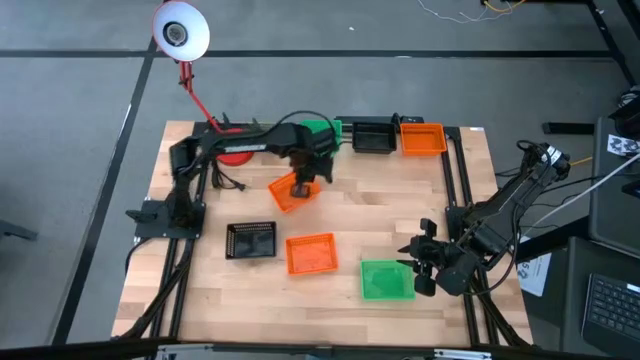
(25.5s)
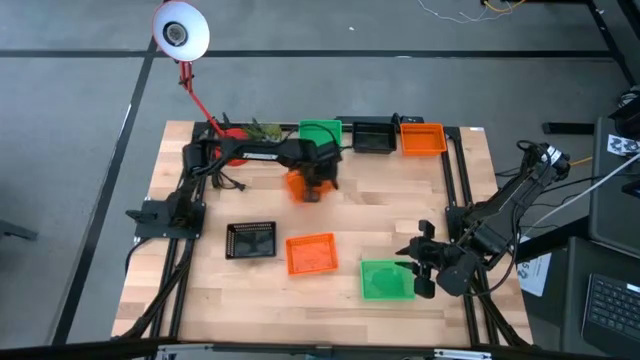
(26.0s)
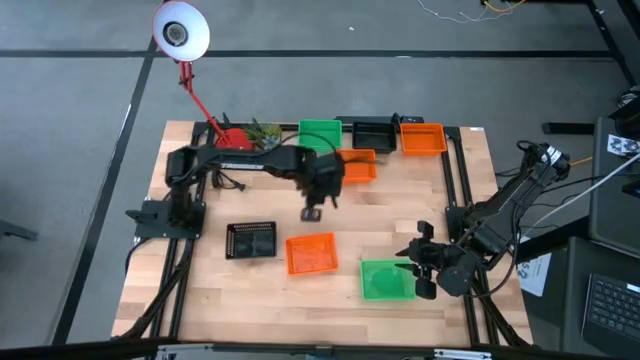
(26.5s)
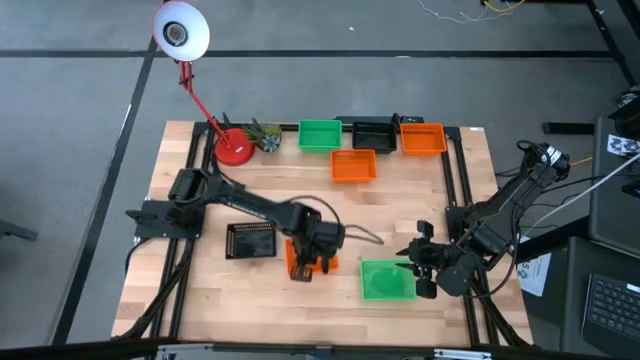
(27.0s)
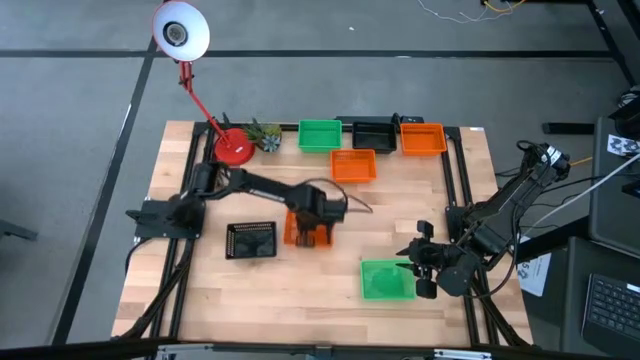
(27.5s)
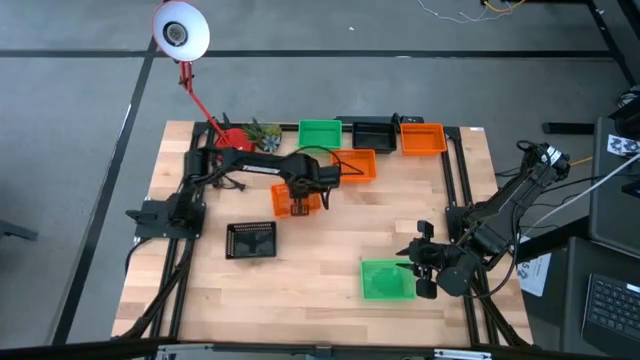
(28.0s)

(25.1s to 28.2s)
Move the orange bins to the top of the table

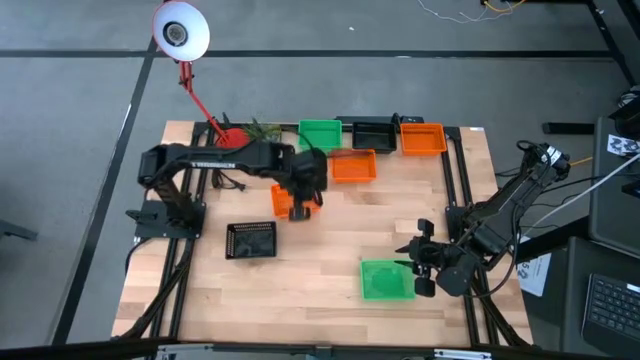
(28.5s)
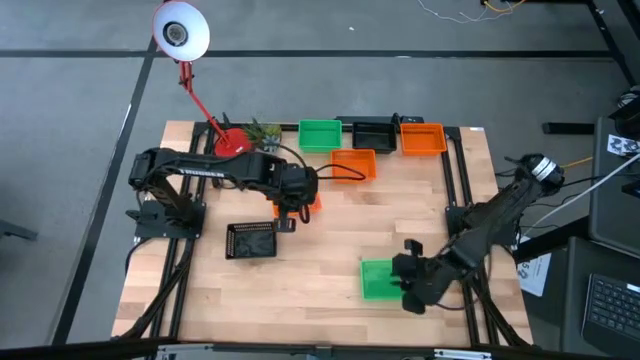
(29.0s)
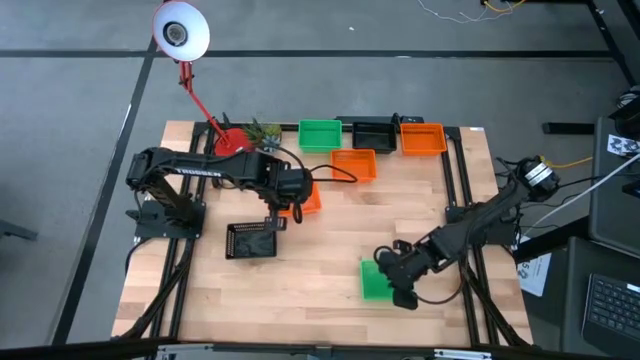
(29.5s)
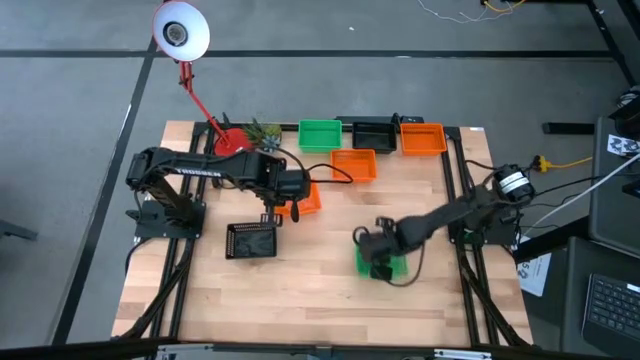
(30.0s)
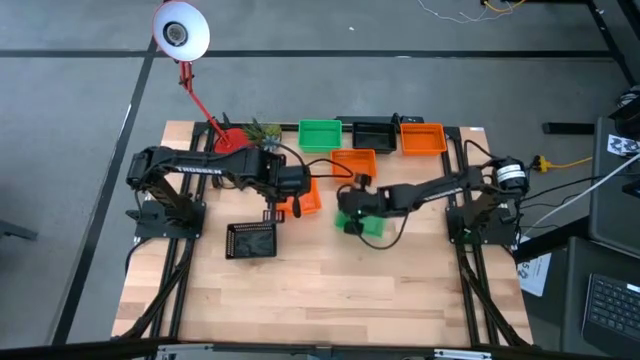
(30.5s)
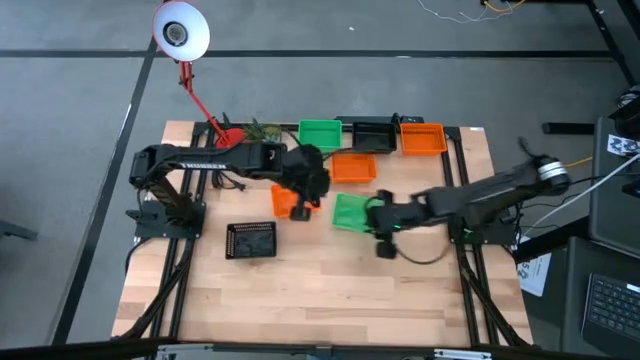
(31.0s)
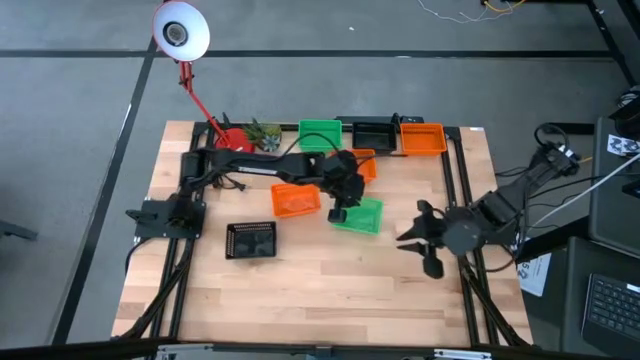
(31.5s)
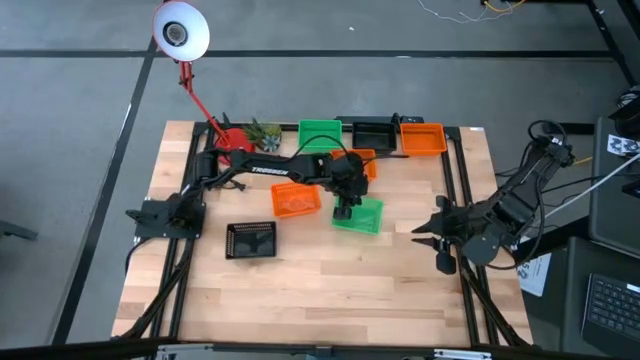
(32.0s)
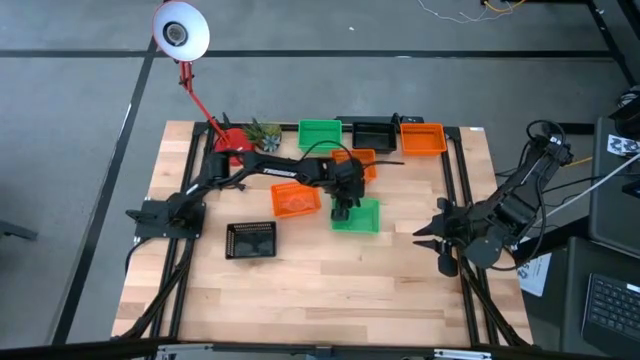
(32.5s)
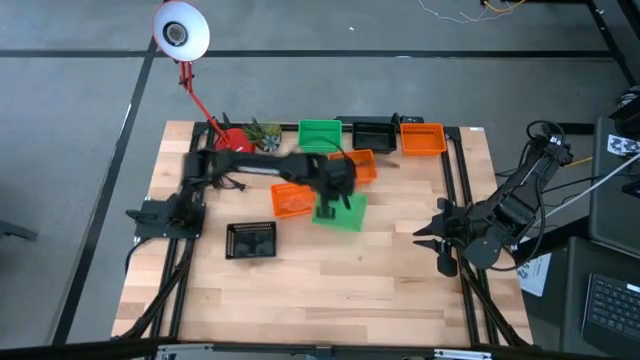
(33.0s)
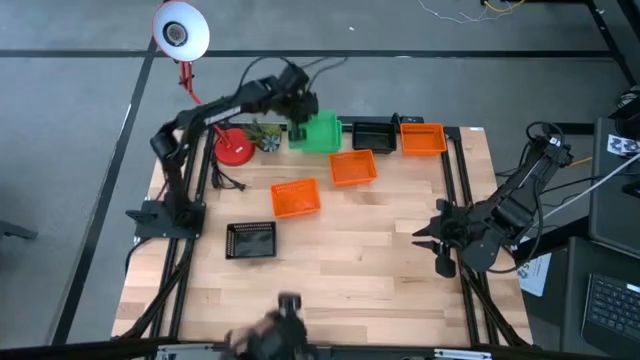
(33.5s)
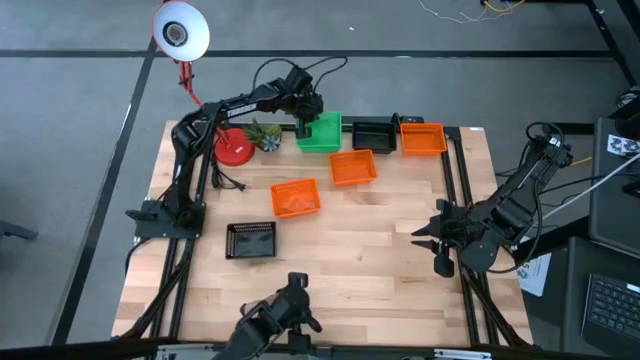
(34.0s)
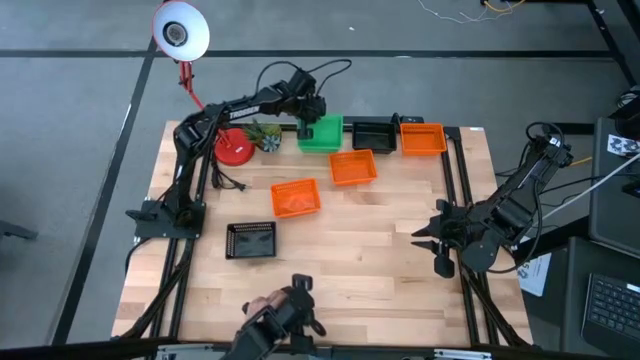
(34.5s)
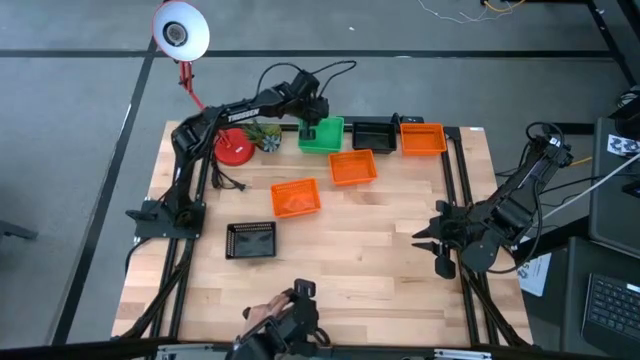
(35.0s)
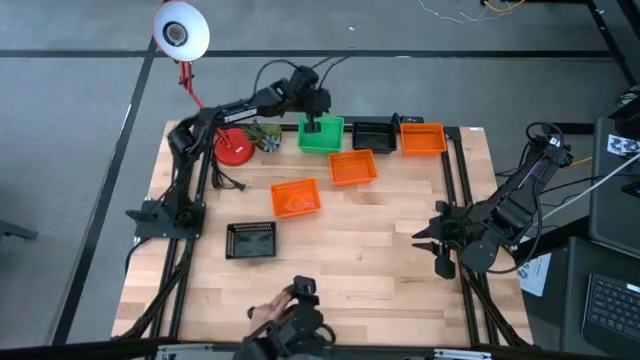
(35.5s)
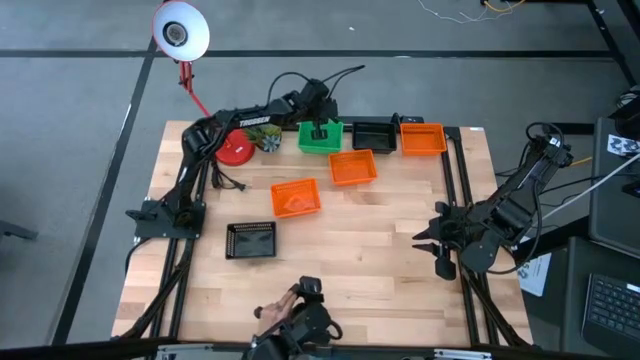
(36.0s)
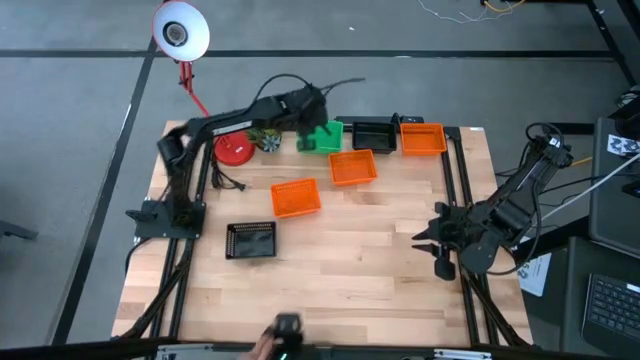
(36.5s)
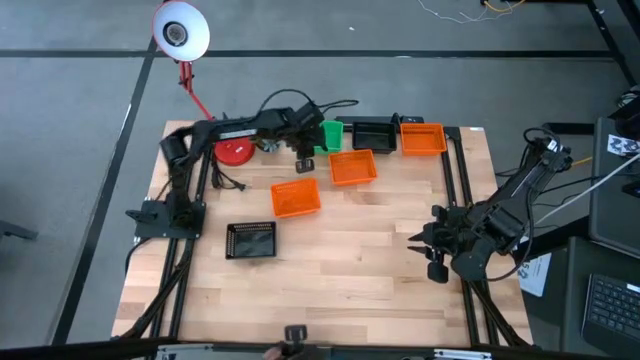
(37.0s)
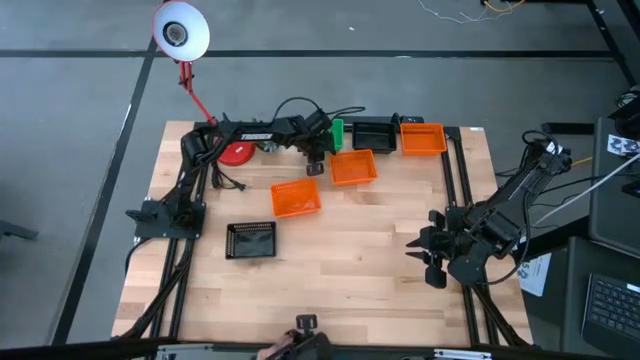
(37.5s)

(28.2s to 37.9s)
Stack the bottom green bin on top of the top green bin

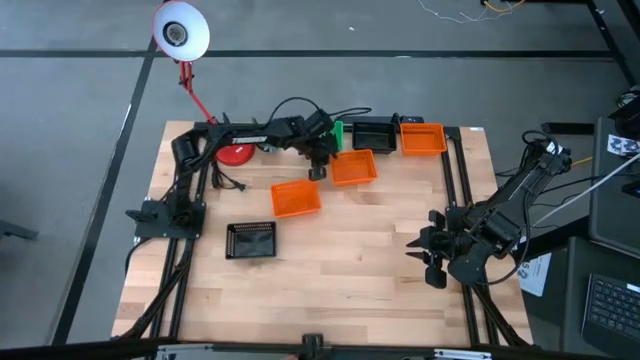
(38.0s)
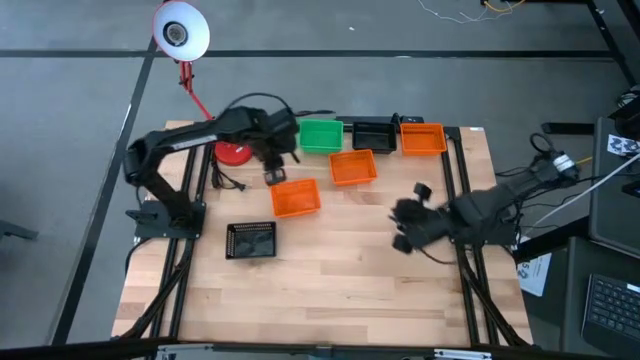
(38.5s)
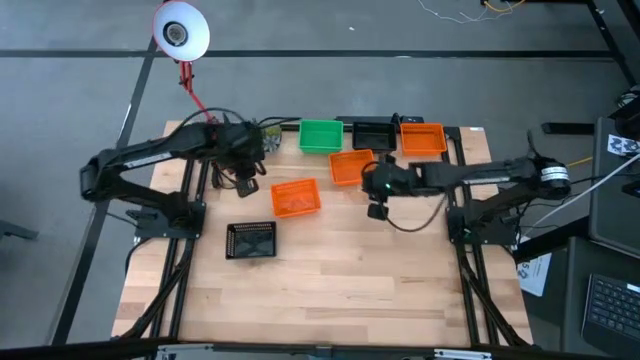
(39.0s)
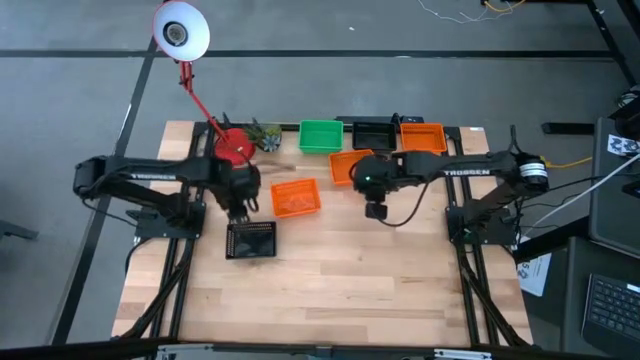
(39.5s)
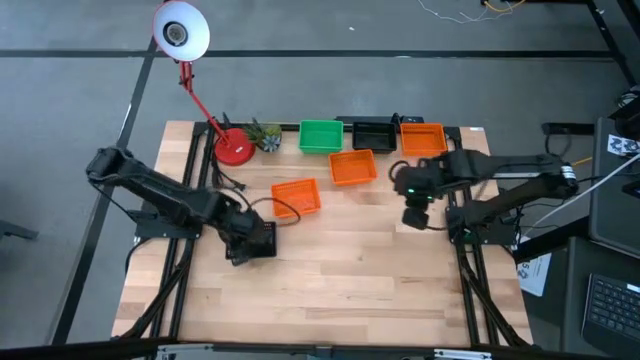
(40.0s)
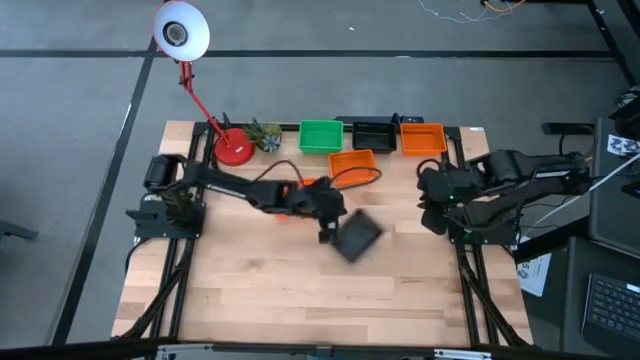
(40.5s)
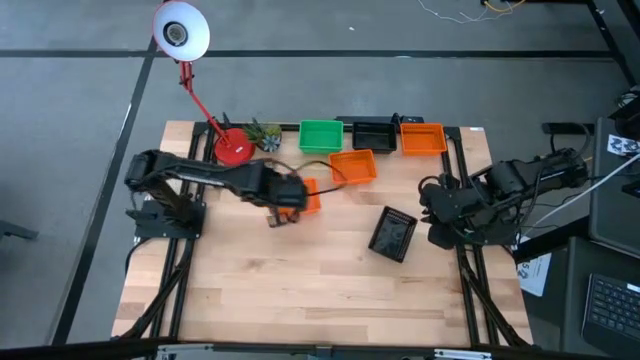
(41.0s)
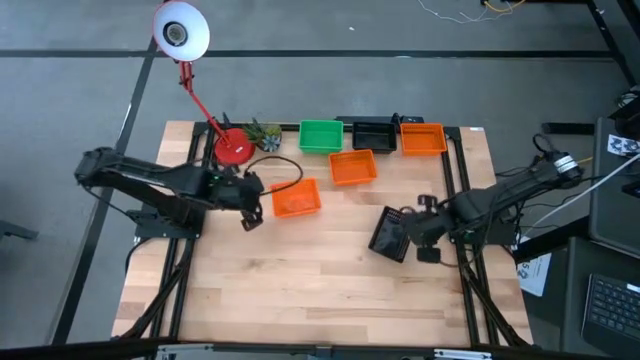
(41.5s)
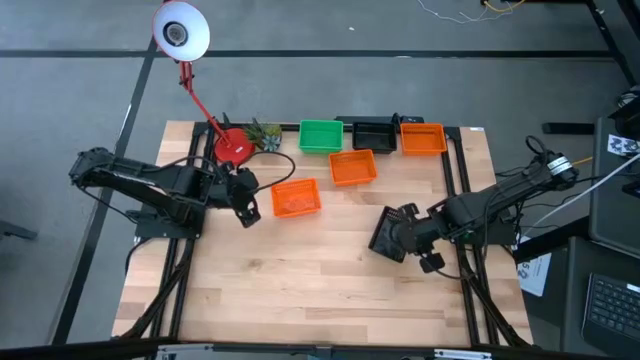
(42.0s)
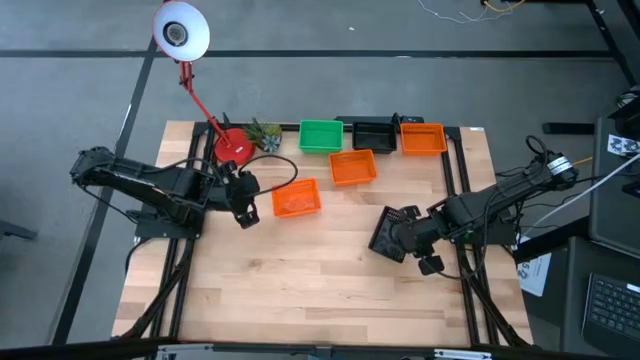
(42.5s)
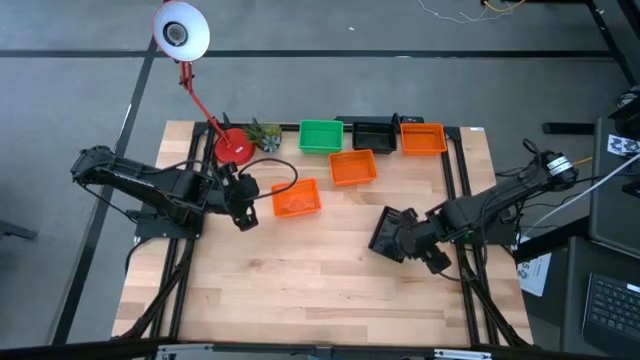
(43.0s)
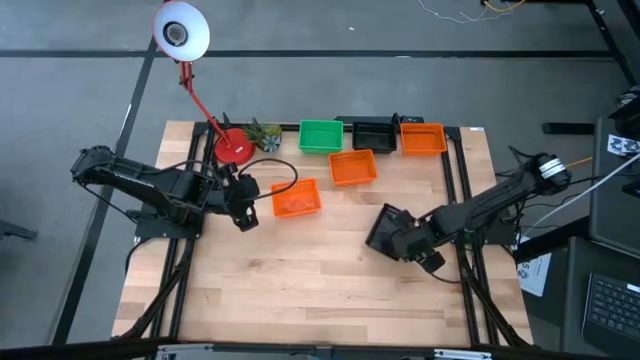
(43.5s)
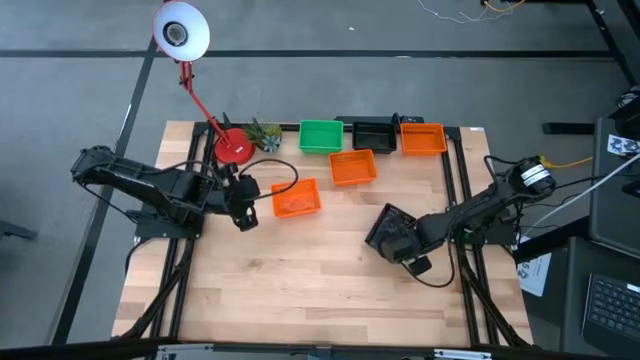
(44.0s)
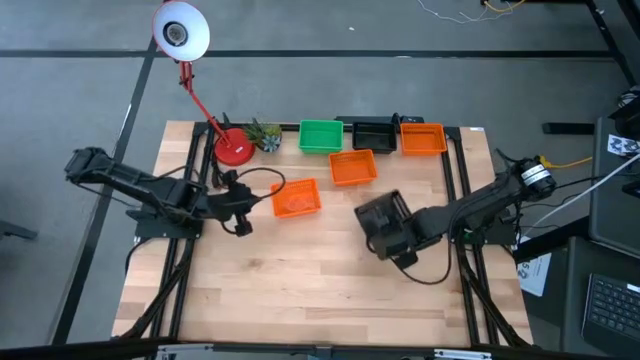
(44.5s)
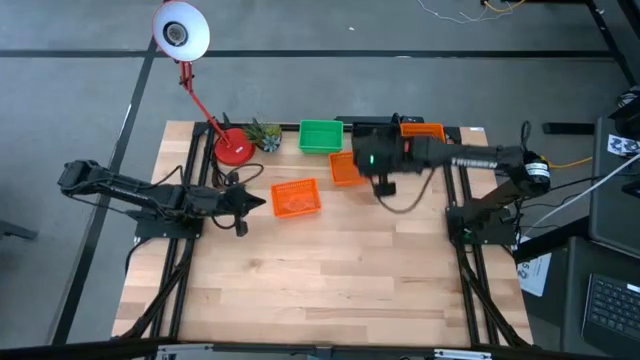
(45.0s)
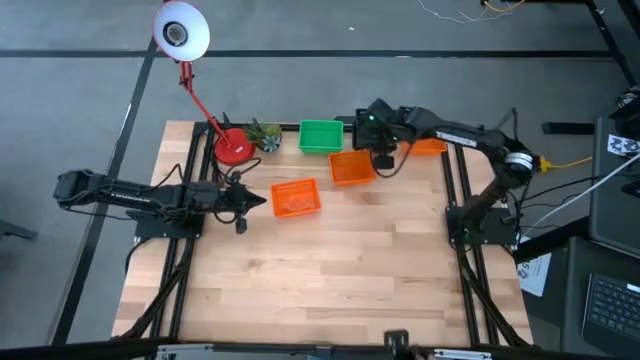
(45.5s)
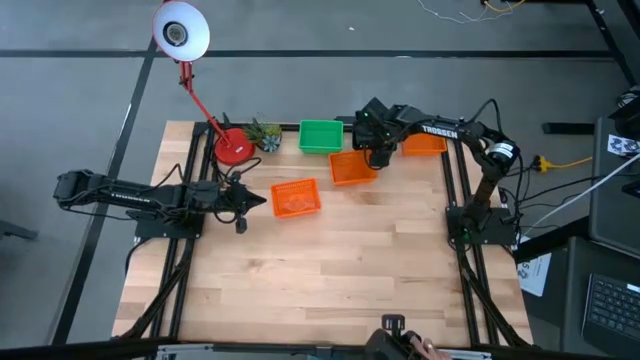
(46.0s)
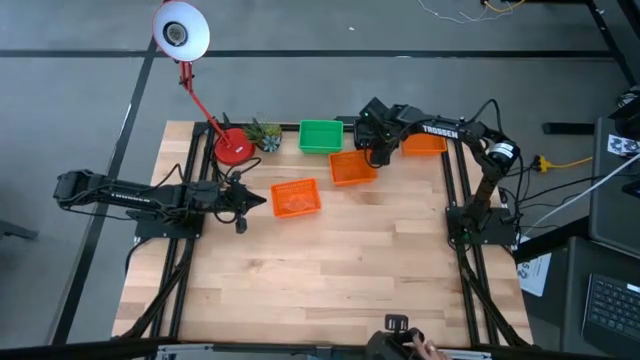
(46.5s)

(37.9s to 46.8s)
Stack the bottom black bin on top of the top black bin
